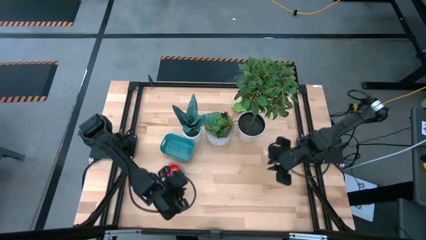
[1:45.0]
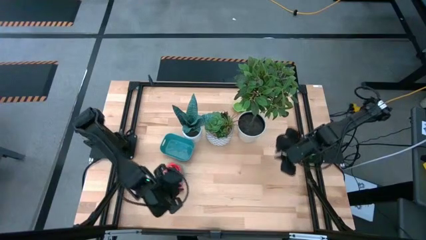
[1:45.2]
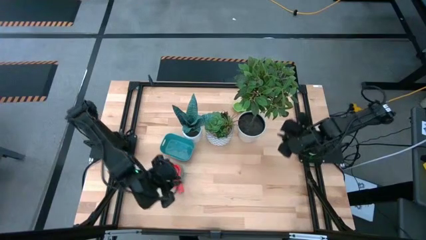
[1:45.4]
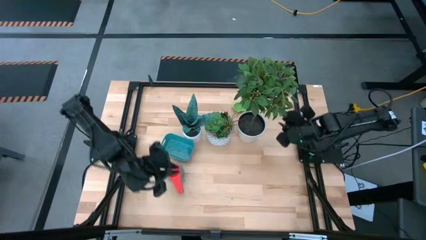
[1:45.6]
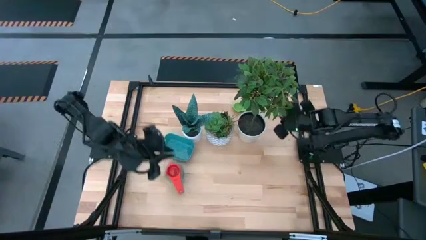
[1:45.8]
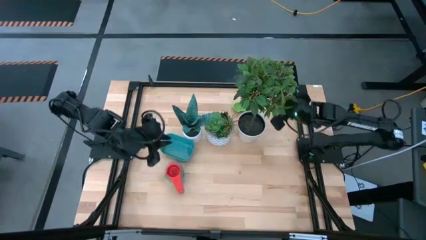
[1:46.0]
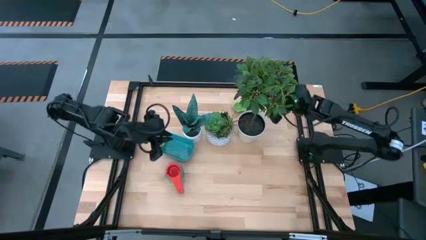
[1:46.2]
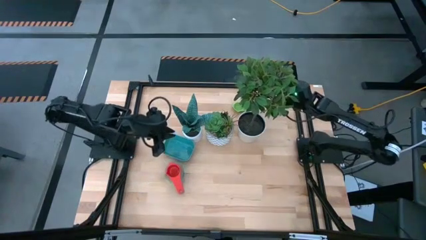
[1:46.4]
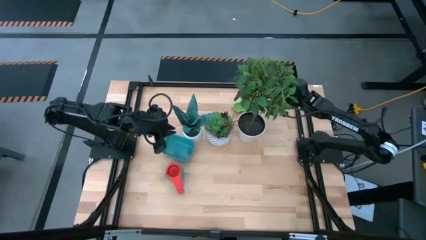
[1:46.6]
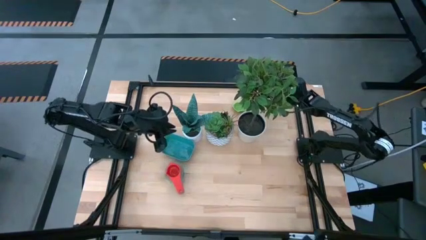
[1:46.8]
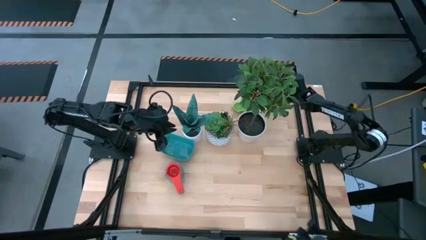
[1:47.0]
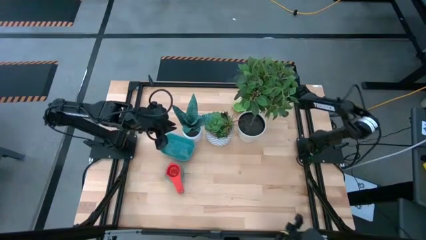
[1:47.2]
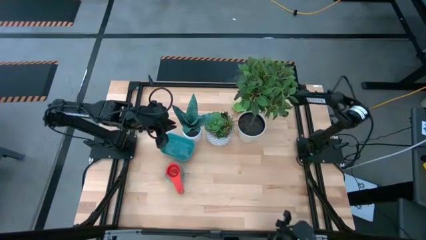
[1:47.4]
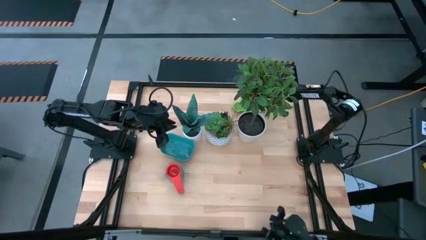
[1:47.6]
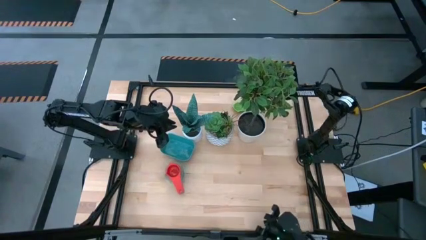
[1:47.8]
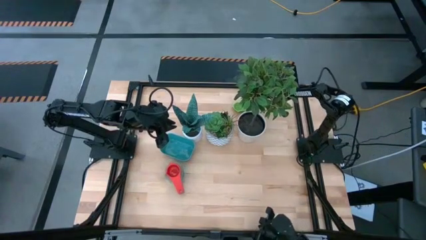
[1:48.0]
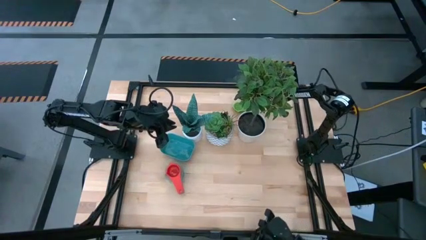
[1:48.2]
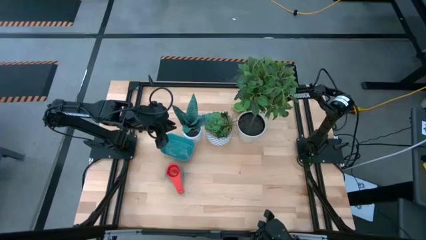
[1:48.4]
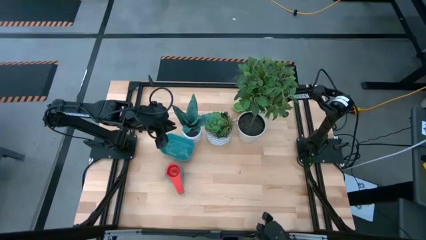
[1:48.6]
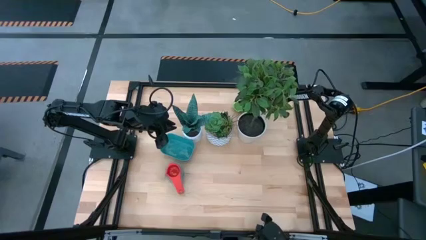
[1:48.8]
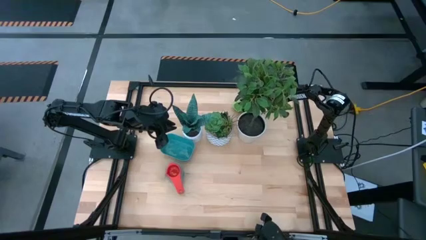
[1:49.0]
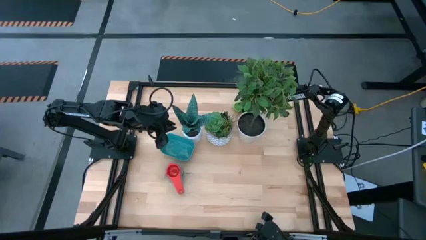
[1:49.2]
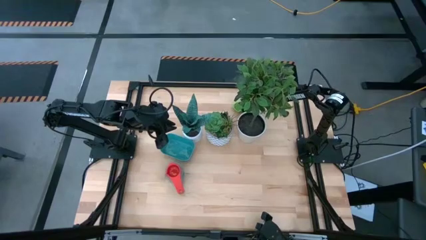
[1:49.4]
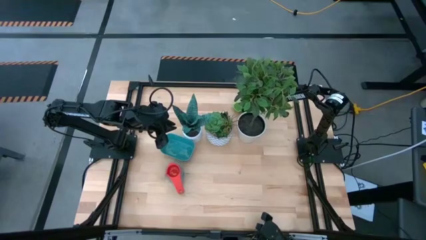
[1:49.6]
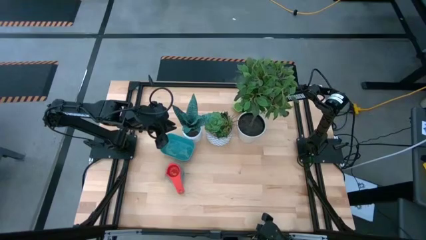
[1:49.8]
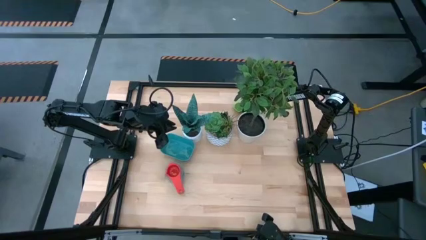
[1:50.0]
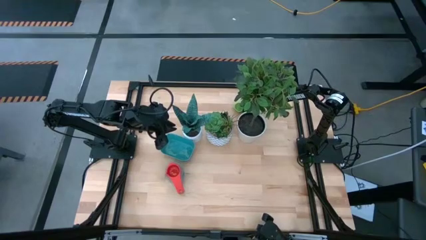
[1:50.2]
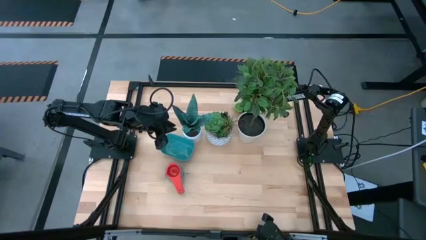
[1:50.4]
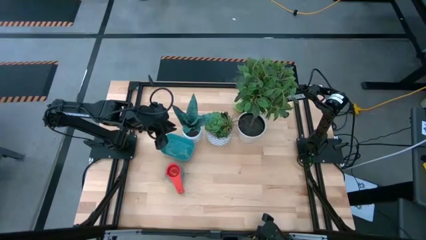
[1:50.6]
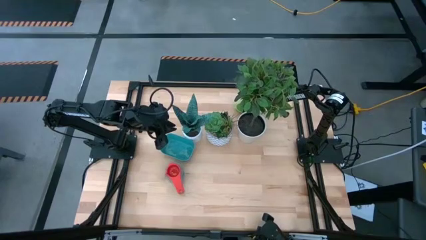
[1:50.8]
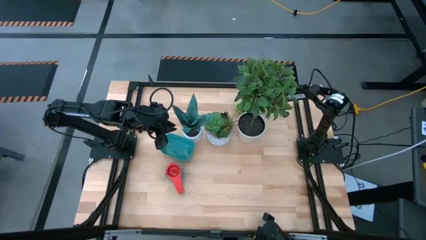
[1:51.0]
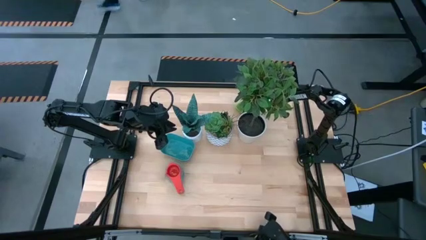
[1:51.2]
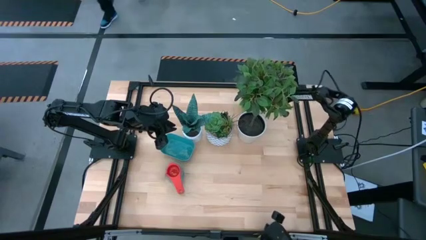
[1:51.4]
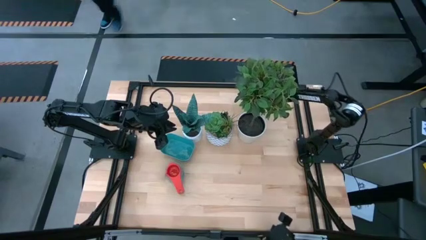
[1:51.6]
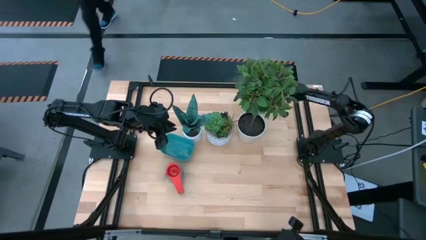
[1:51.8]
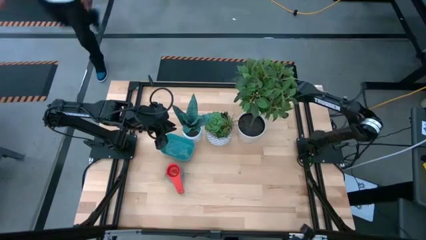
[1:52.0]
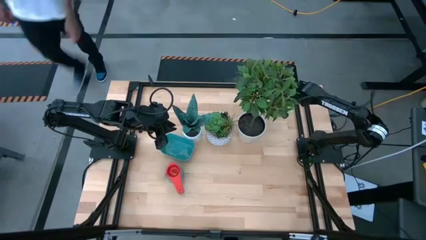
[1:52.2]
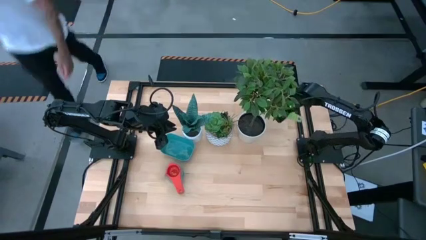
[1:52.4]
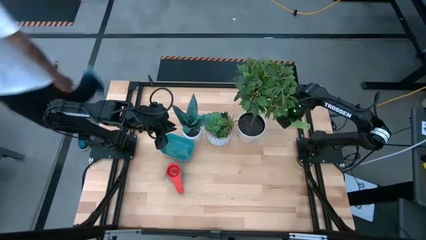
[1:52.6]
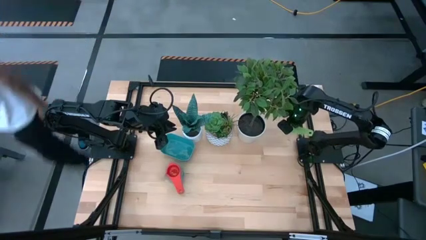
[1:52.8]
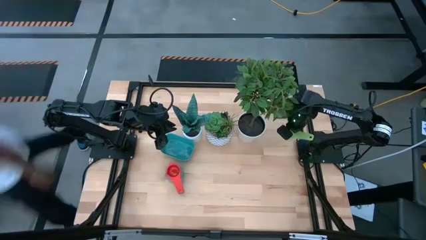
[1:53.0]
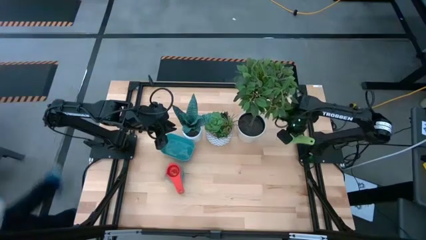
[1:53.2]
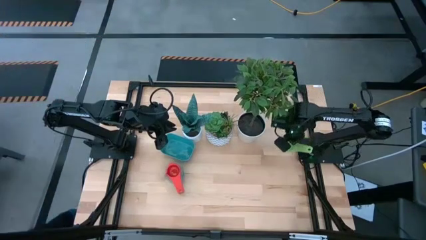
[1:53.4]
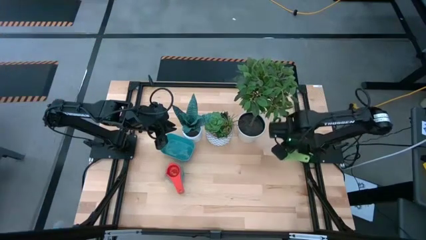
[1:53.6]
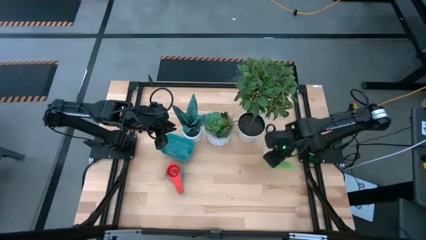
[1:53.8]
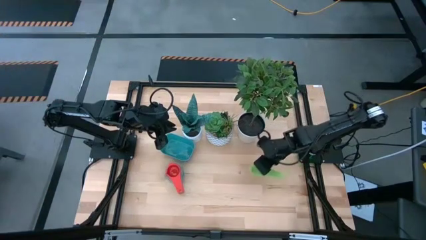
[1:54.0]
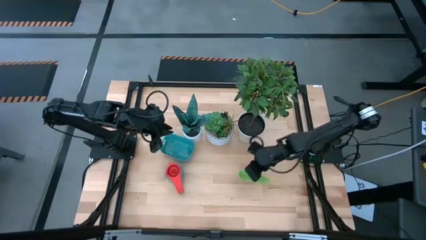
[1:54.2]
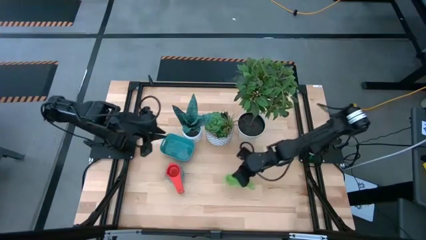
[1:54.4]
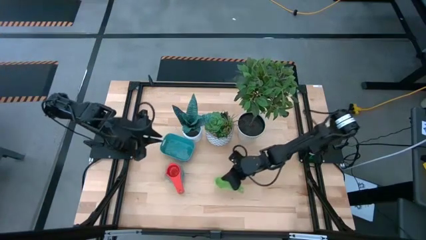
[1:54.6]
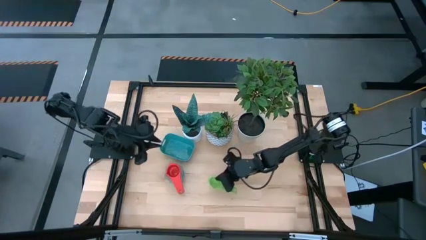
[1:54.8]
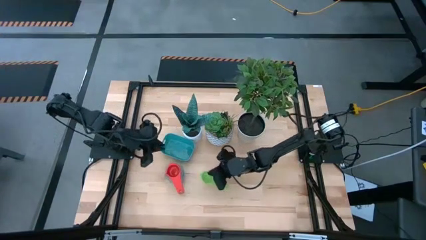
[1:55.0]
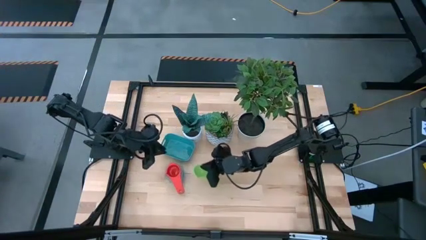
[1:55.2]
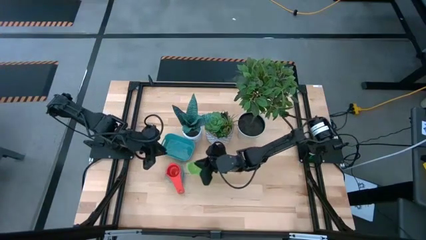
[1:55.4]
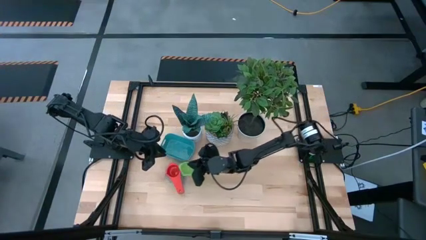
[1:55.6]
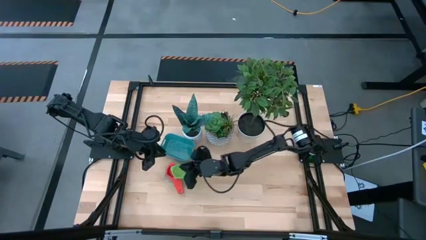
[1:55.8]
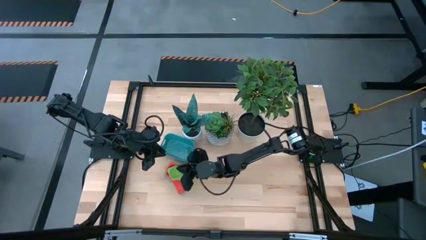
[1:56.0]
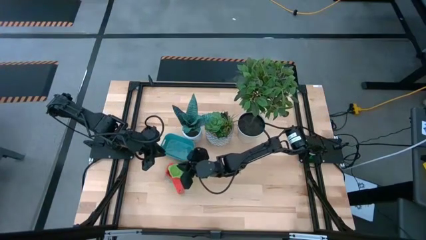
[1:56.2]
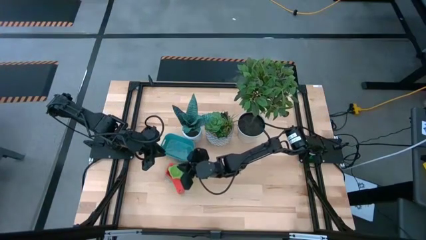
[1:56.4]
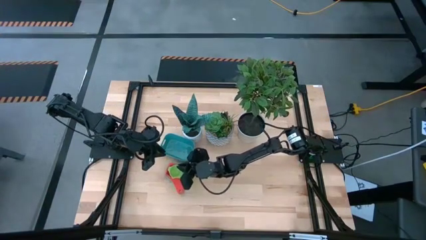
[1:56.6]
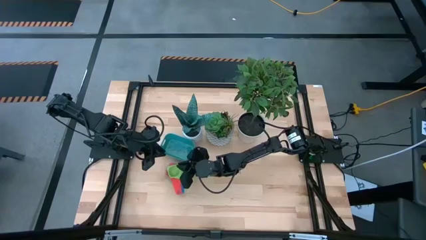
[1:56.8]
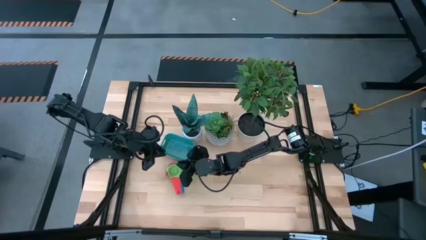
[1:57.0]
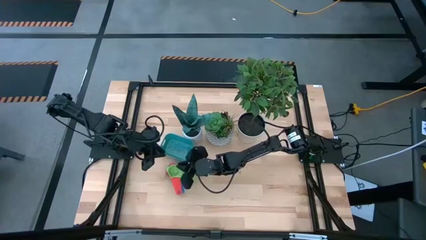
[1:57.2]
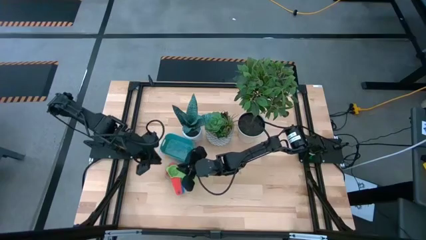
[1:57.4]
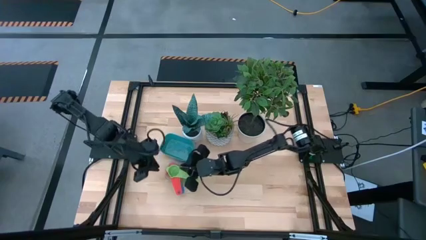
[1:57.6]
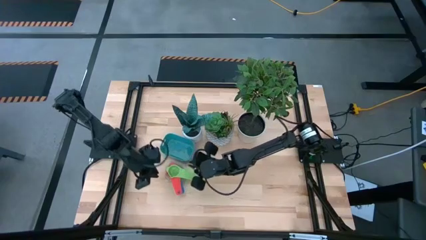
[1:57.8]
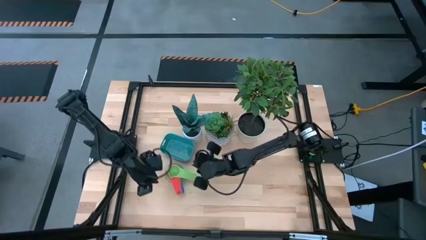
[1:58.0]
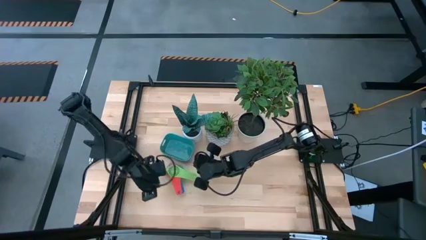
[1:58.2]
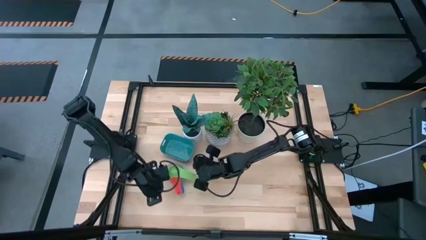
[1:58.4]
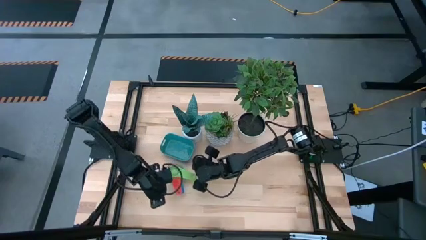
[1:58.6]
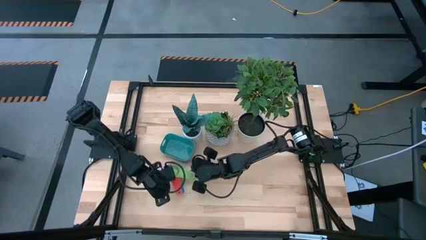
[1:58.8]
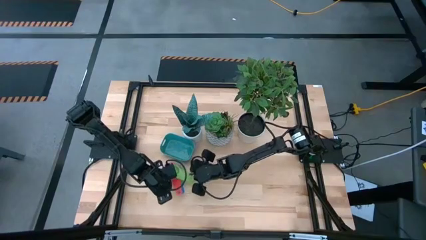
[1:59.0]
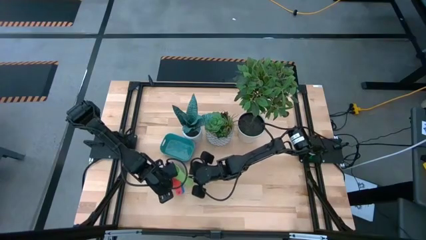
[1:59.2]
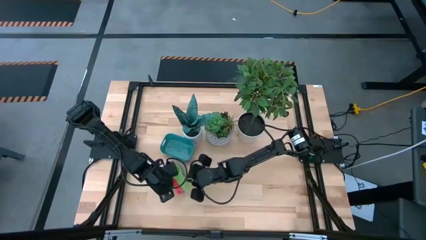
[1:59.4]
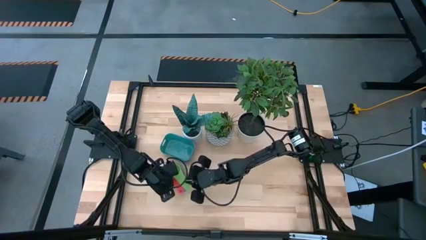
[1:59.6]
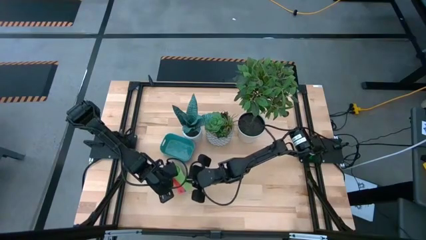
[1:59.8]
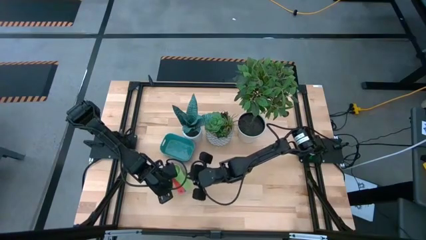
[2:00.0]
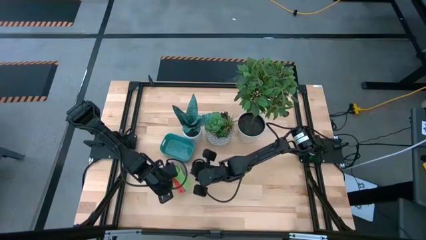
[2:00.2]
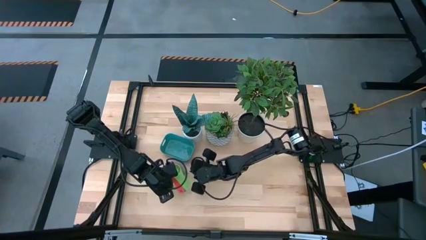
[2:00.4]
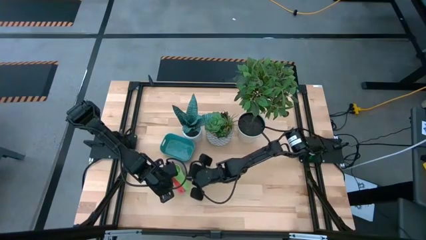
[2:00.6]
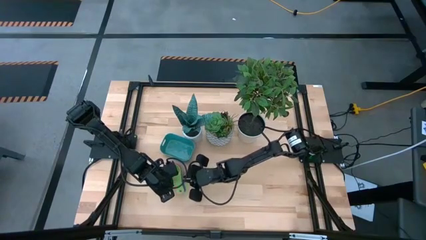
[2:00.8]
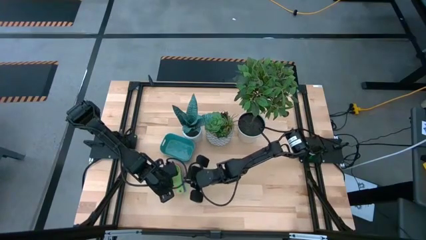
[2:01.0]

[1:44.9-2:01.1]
Task: Nest measuring cups in basket
Stack the green measuring cup into the red measuring cup
